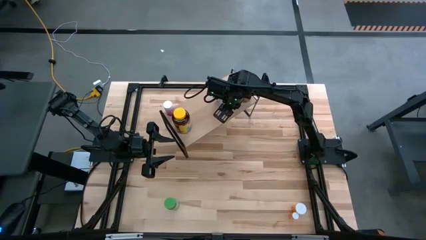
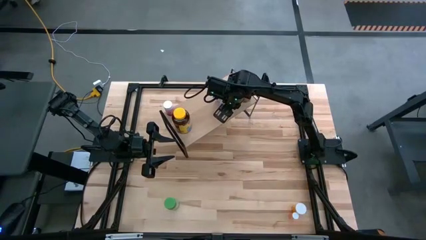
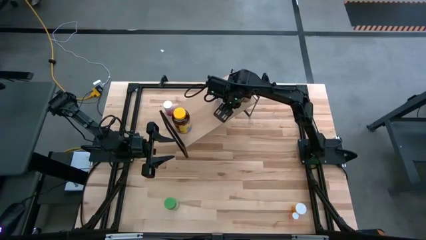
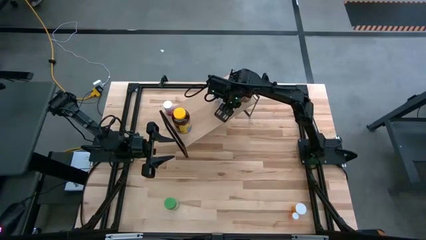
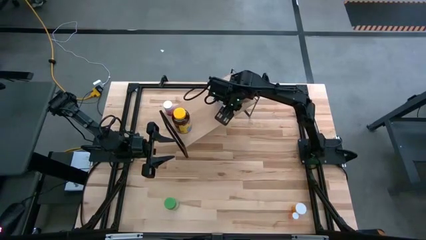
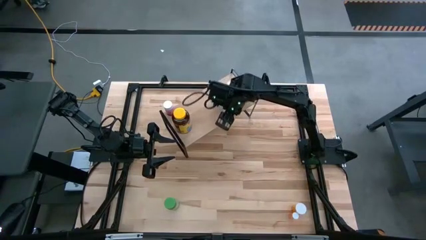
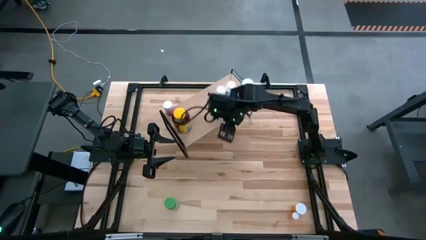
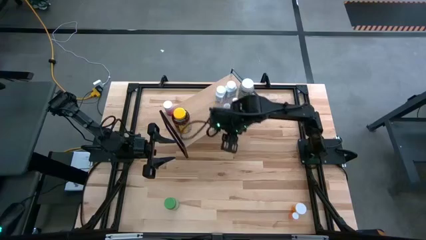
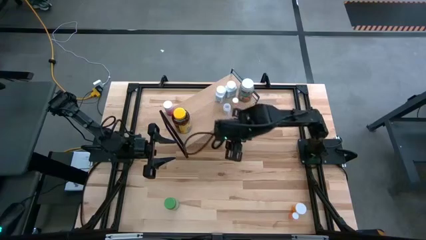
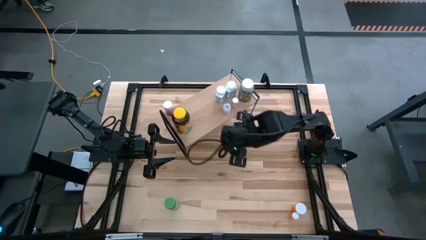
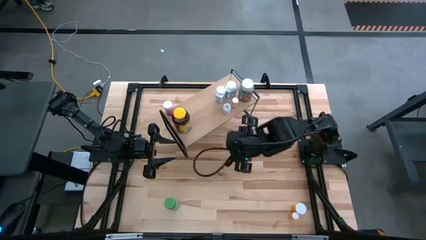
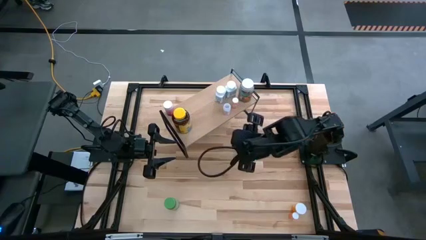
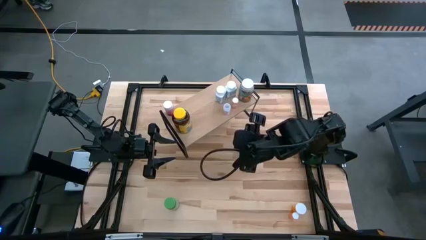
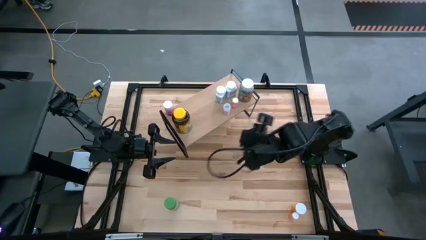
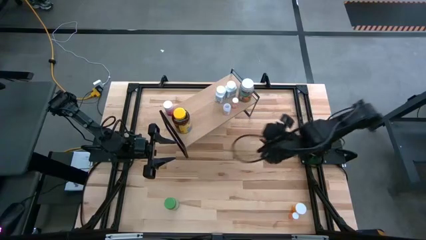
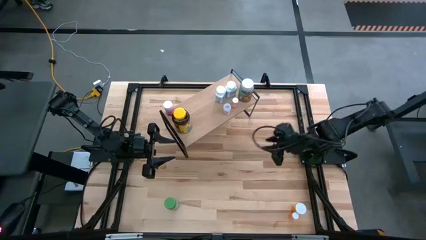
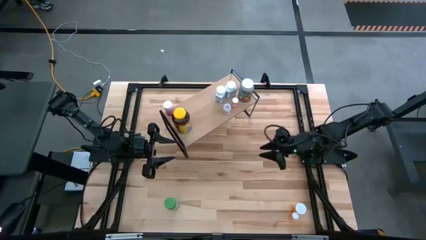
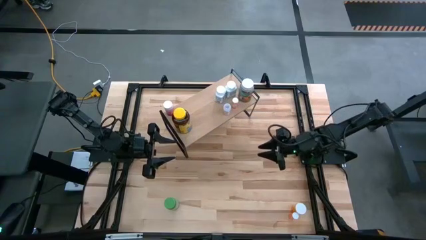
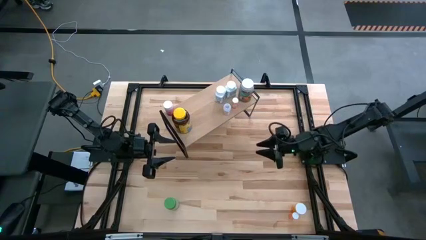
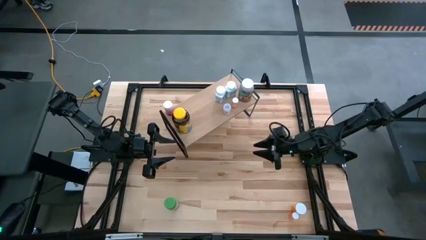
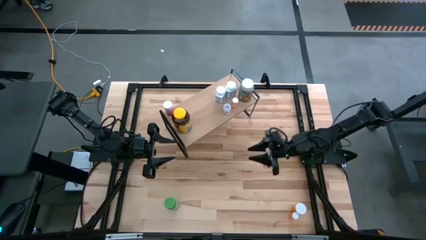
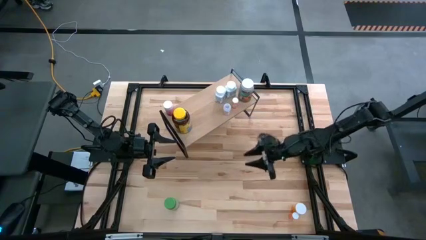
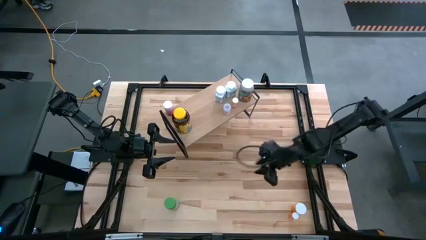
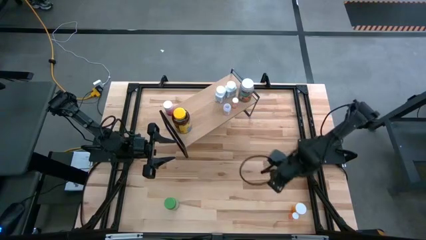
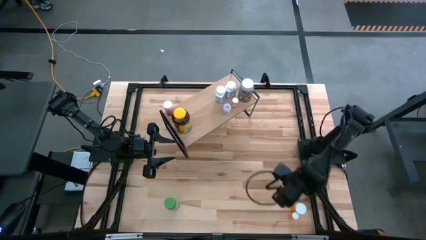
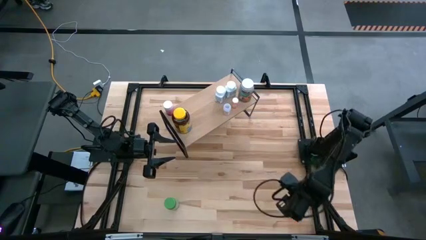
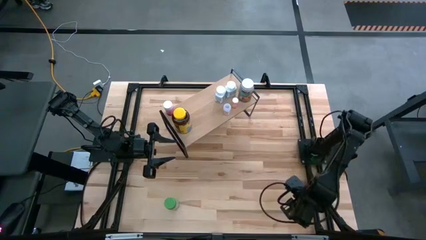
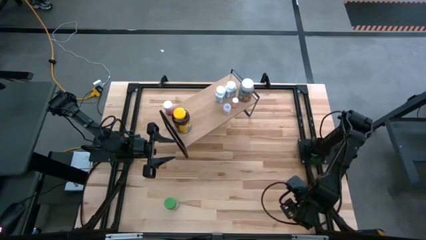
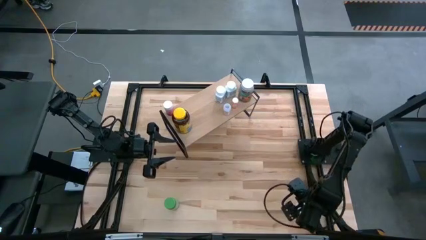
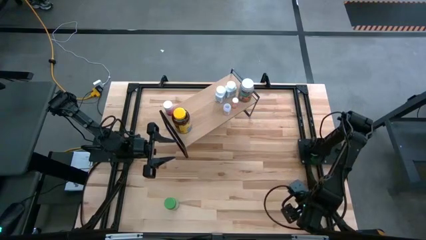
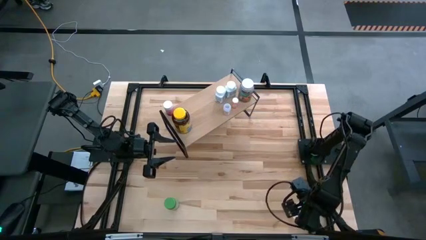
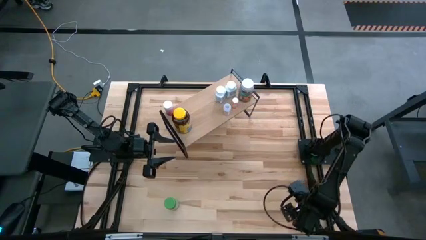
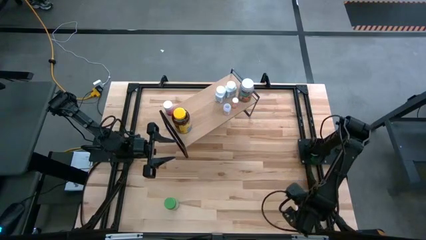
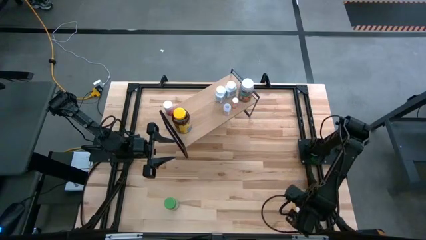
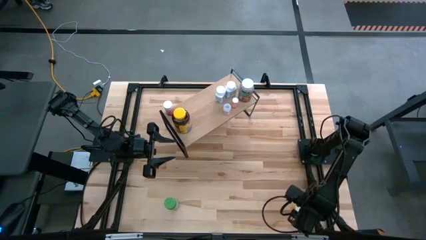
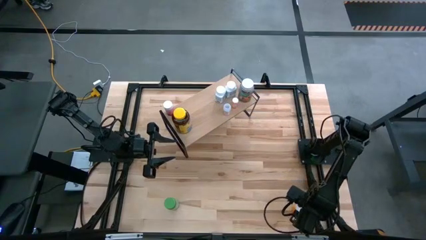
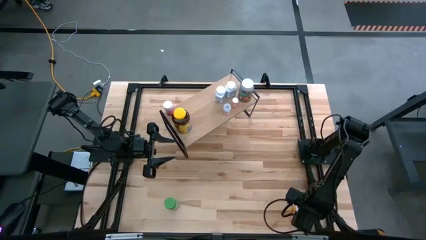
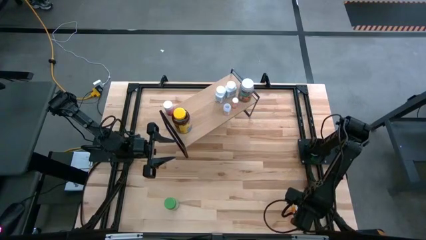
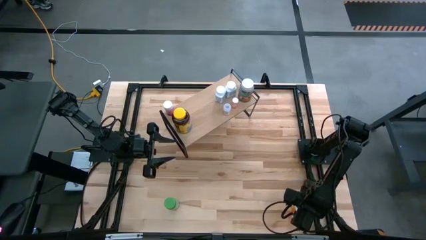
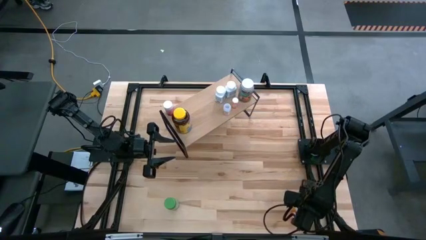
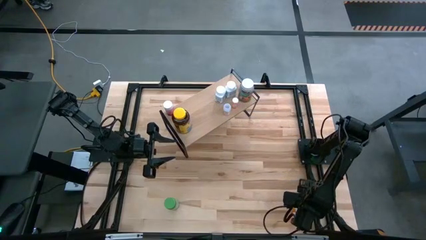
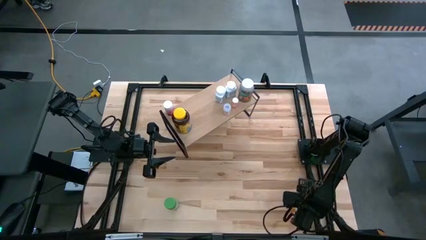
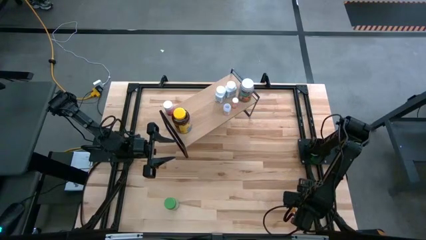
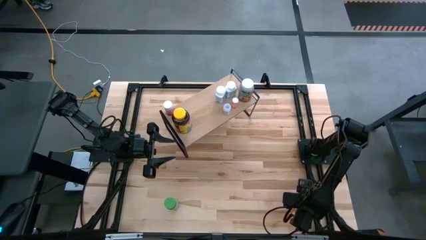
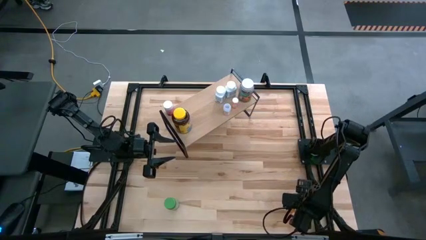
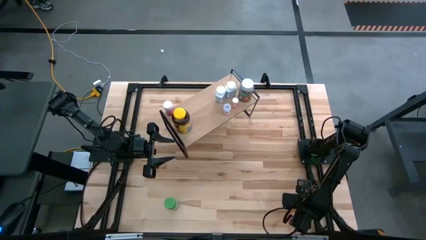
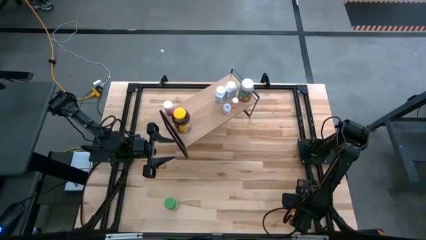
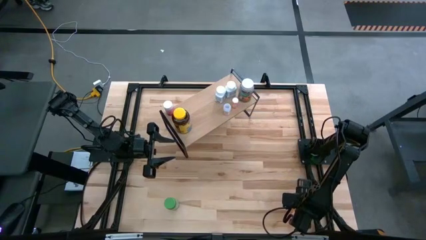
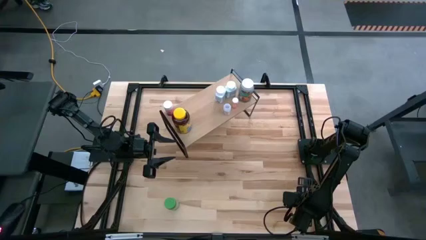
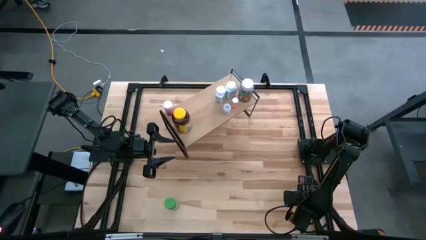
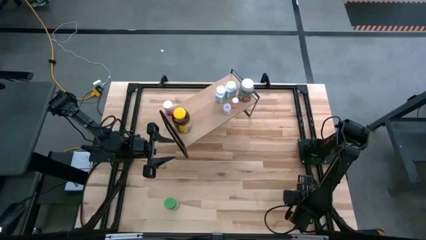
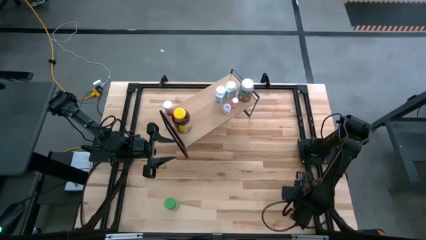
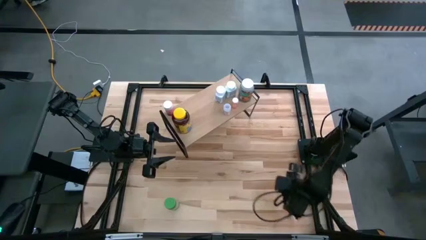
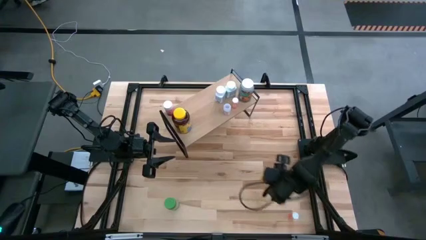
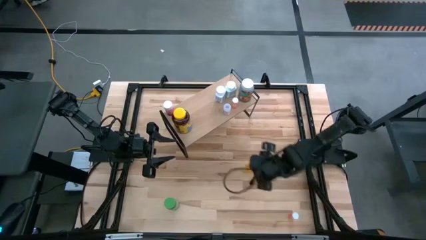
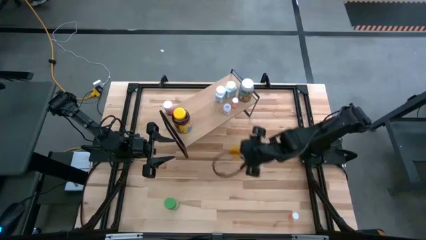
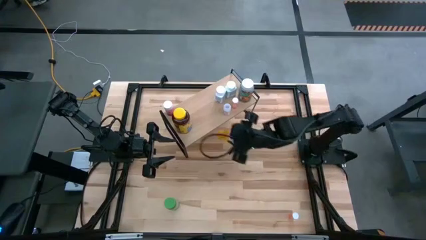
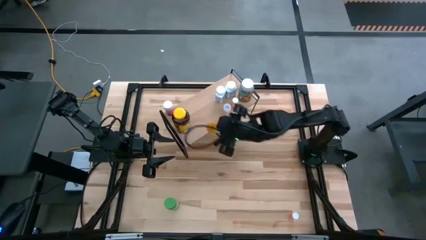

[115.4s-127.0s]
Task: Pick and place medicine bottles onto shelf by color
Put the orange medicine bottle on the shelf
